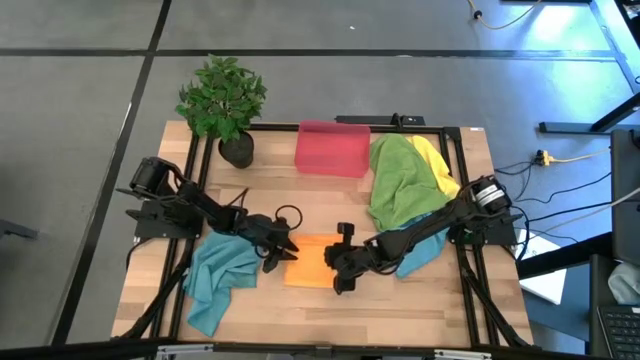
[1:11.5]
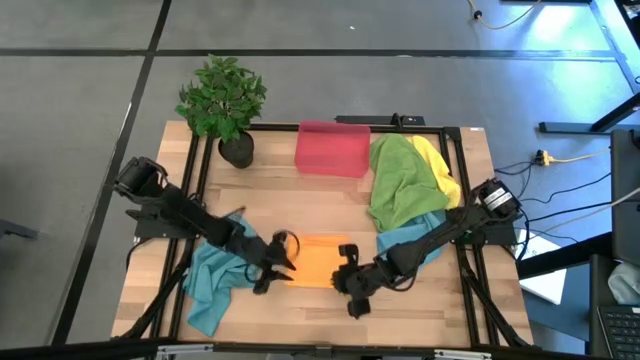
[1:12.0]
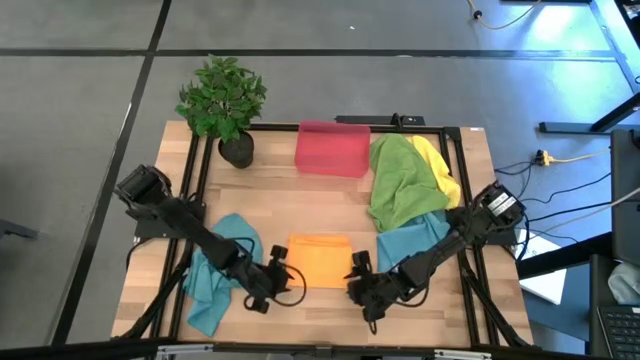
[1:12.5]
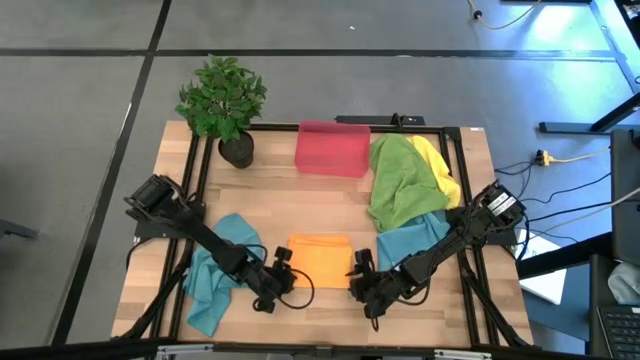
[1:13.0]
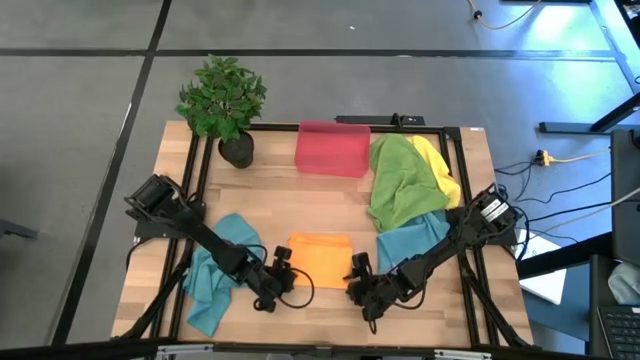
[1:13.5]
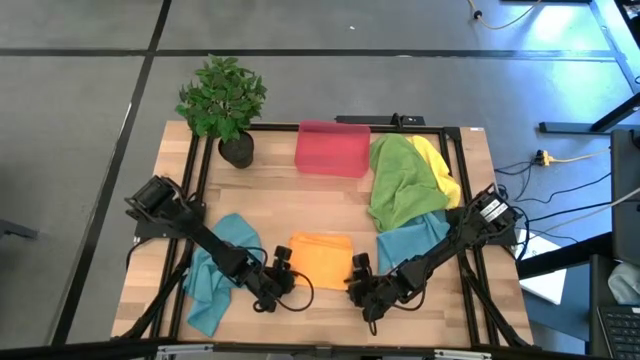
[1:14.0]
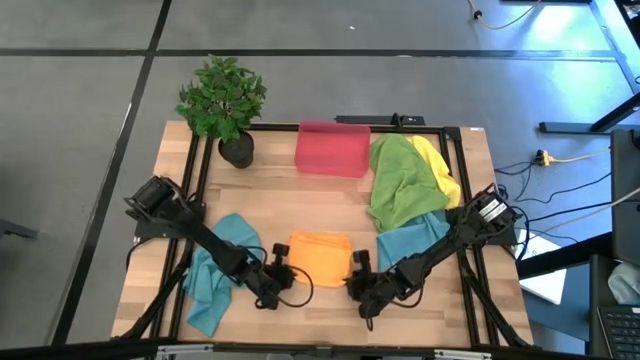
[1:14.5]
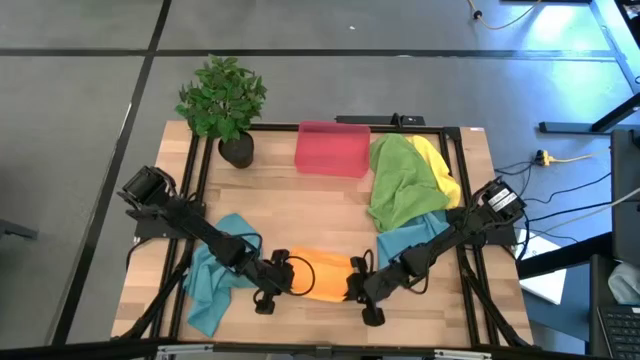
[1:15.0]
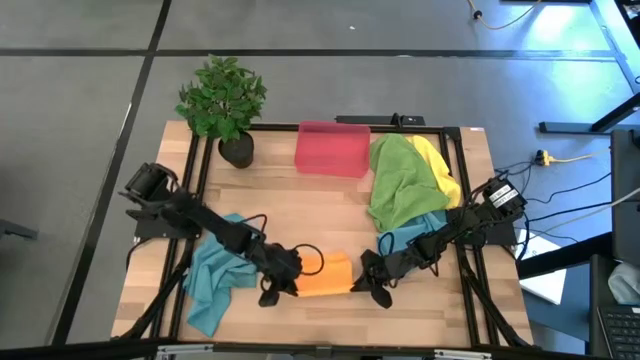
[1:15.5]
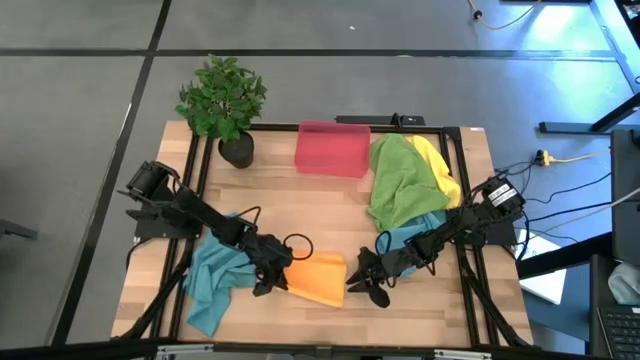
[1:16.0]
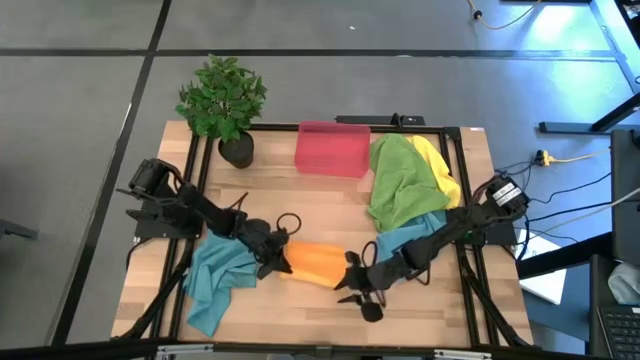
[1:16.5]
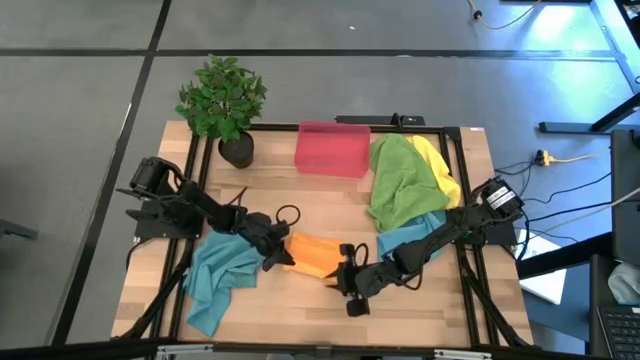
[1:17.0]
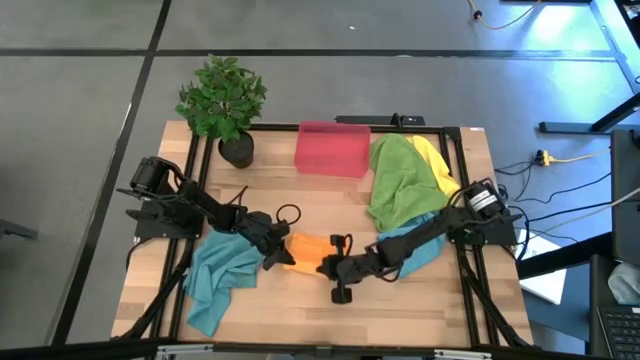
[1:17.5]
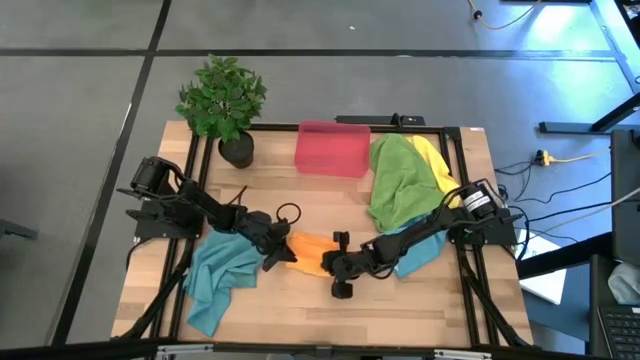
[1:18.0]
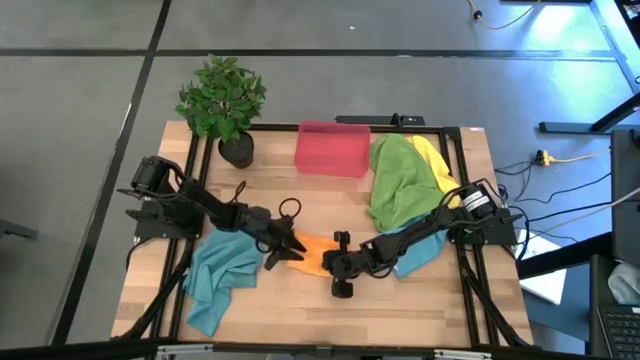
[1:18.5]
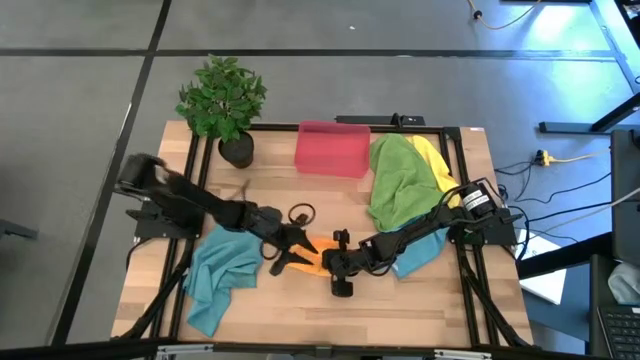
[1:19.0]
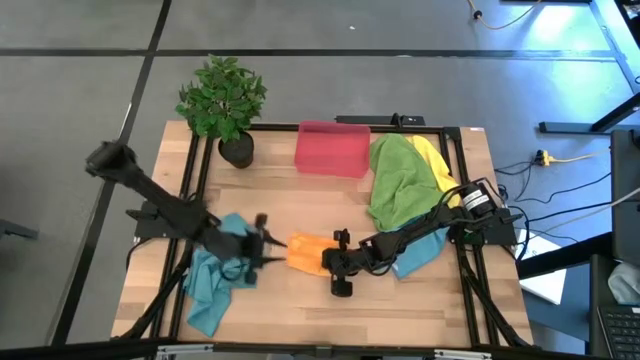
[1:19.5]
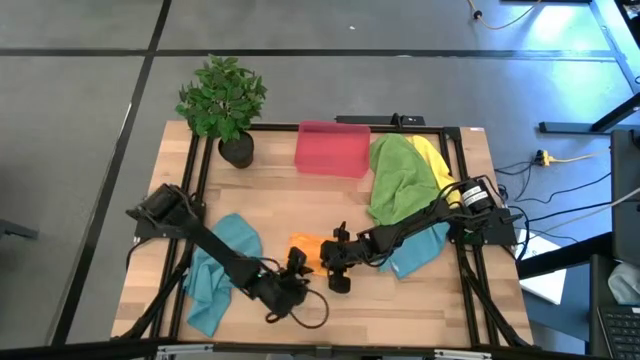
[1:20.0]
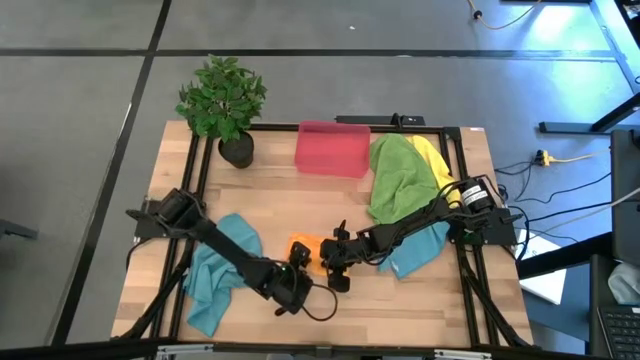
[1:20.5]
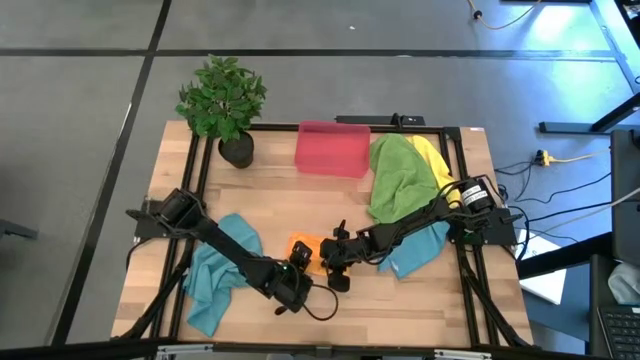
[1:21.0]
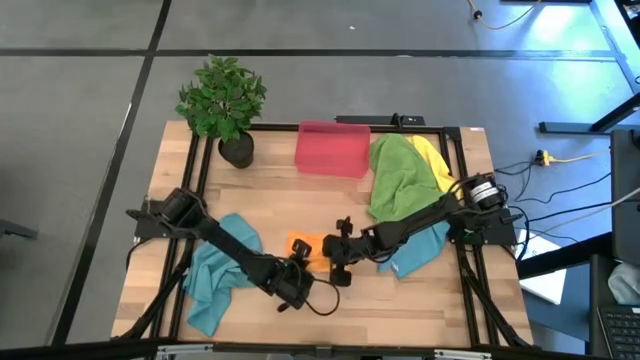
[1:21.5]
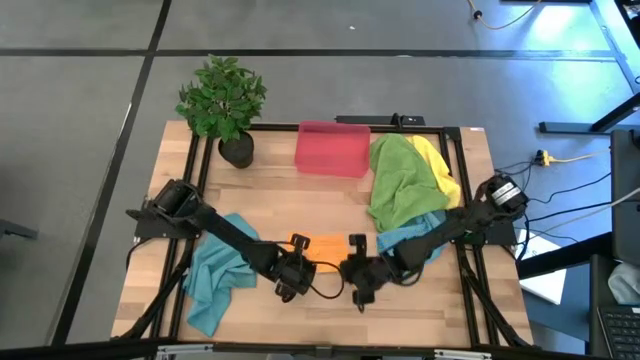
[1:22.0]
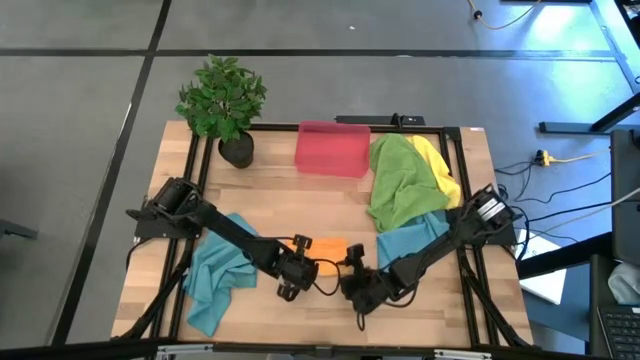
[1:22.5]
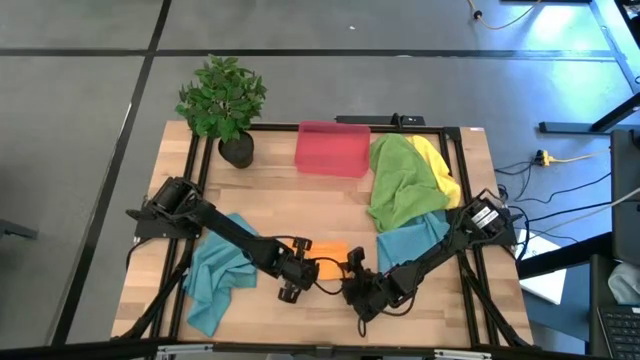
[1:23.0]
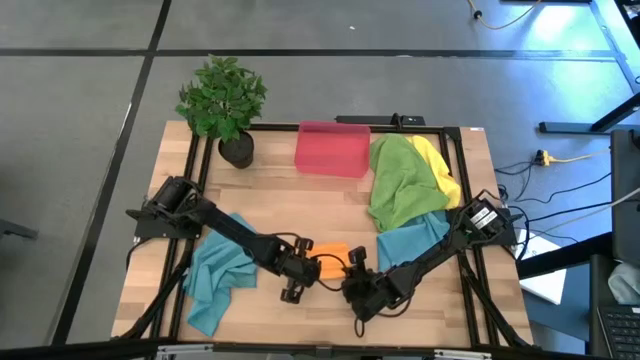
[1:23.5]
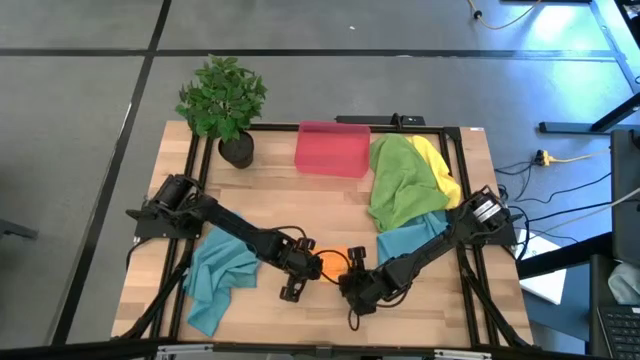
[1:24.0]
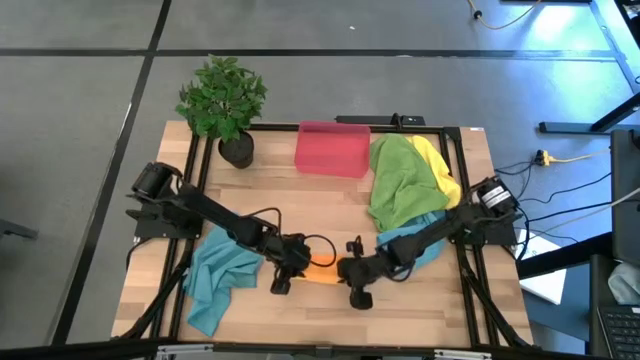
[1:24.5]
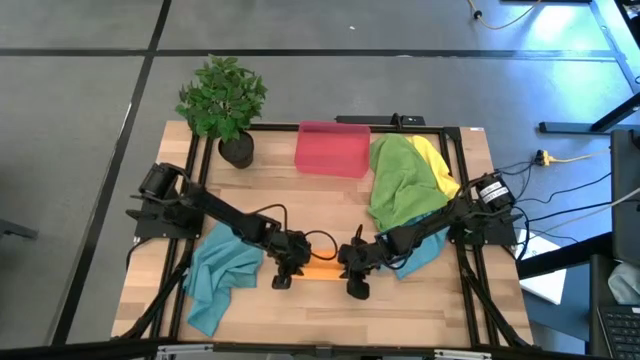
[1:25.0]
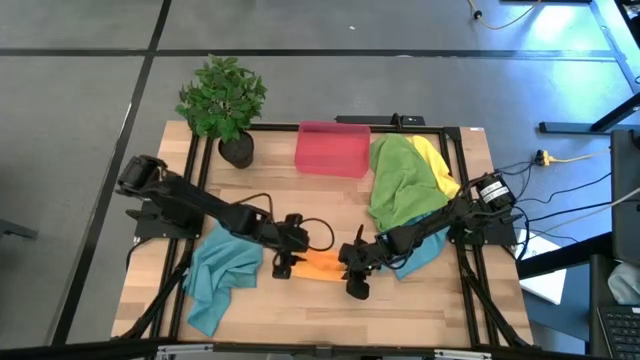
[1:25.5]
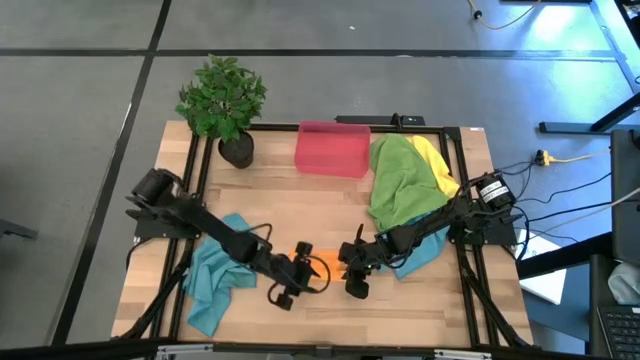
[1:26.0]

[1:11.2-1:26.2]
Task: Roll microfiber towels into tight, uniform cylinder then place into a basket
Roll the orange towel

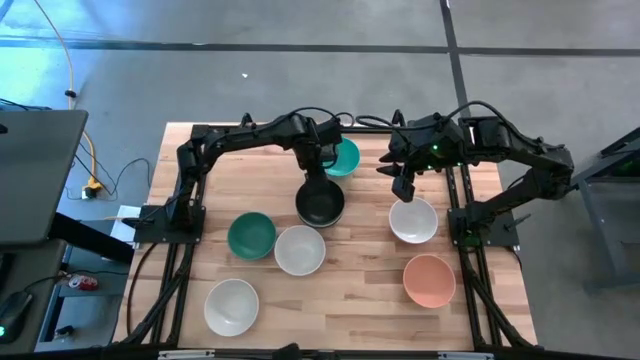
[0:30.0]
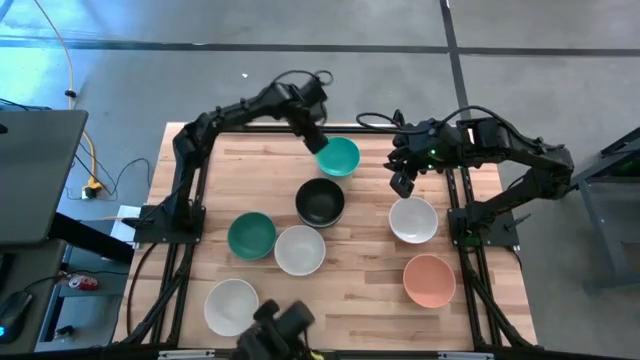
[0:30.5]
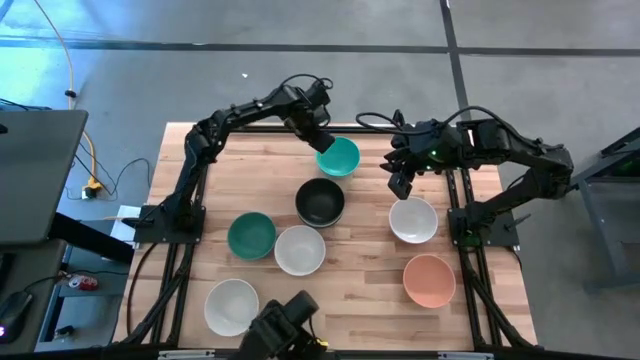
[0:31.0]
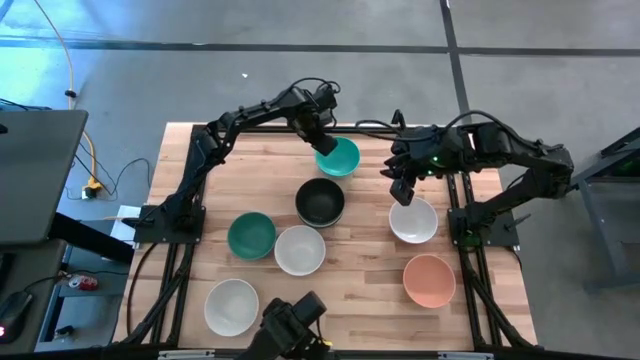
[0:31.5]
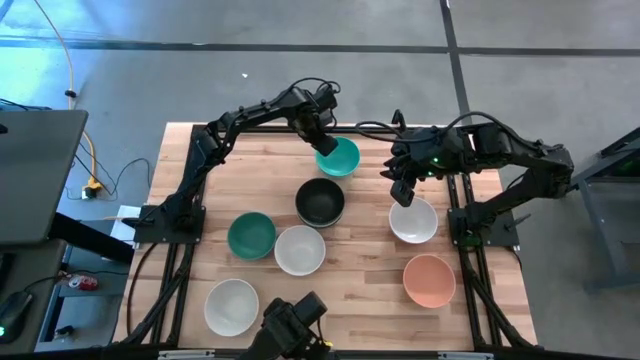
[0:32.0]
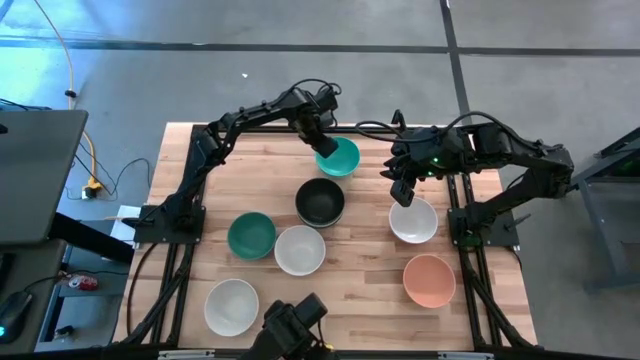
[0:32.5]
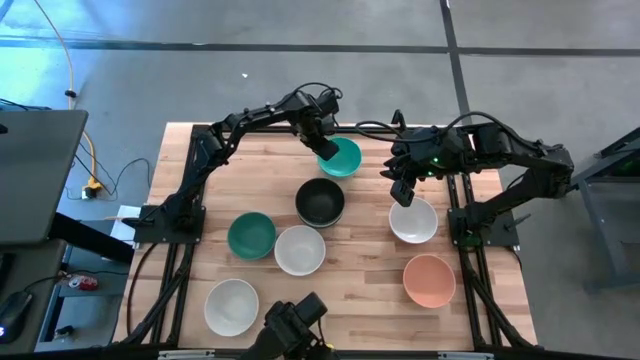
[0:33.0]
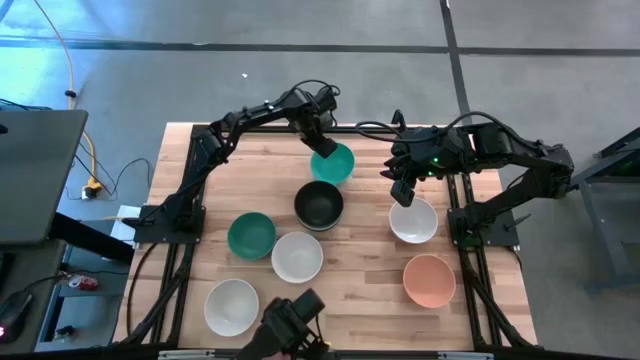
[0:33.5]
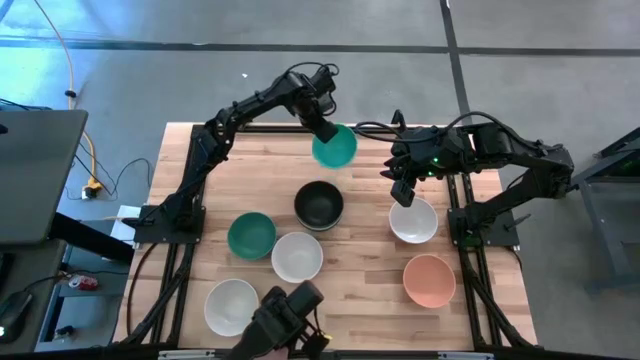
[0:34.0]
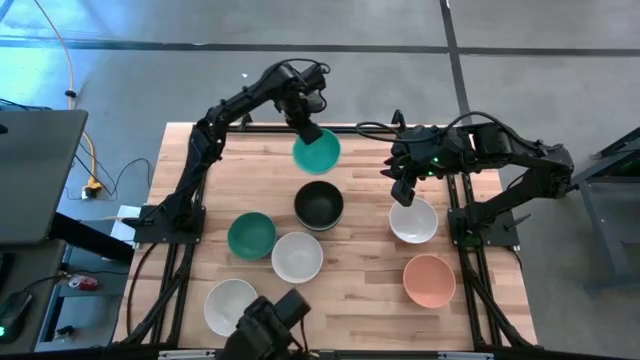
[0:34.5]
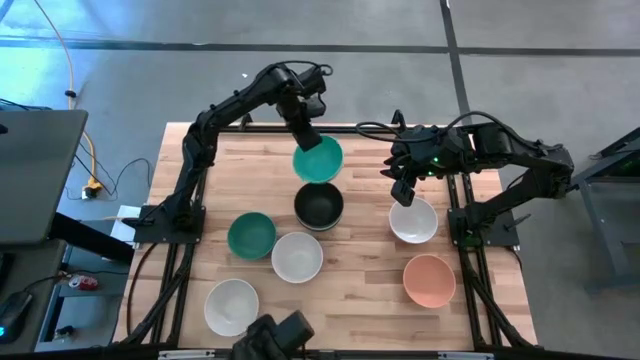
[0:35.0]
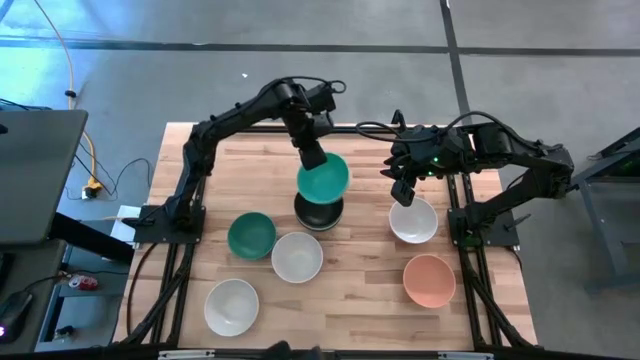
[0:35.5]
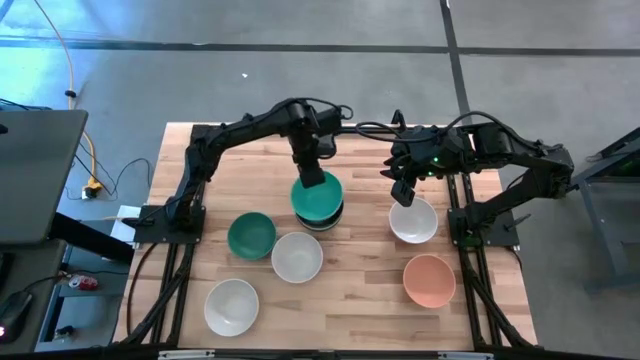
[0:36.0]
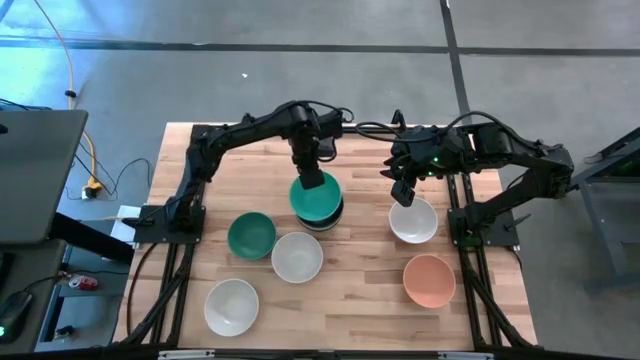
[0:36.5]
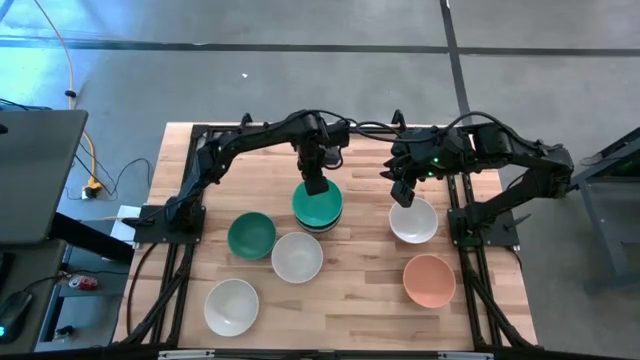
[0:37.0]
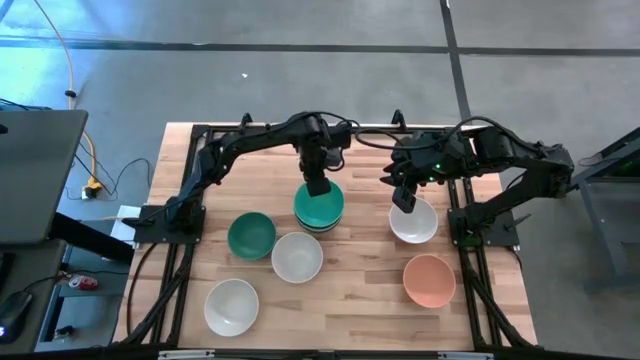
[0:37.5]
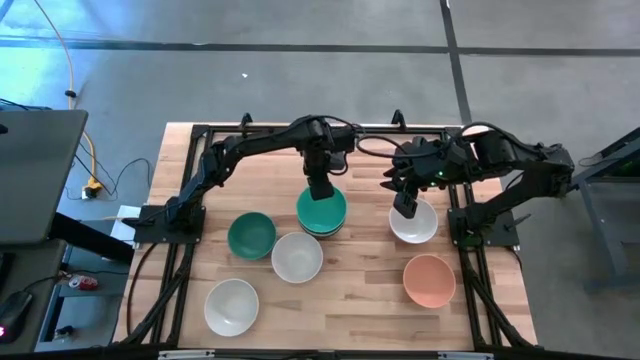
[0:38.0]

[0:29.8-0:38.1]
Task: Nest bowls inside each other
Stack the light blue bowl on top of the black bowl
